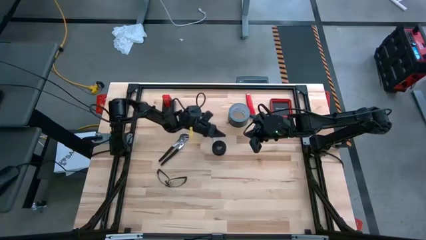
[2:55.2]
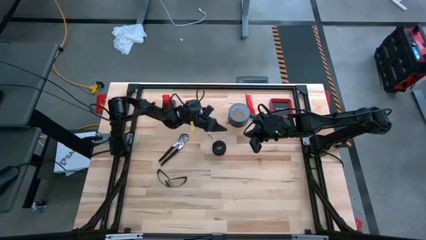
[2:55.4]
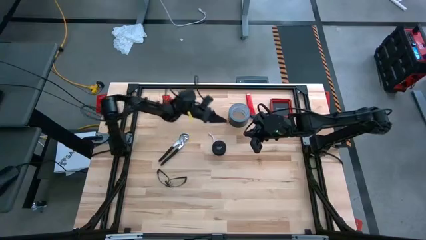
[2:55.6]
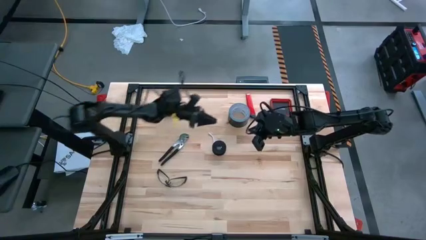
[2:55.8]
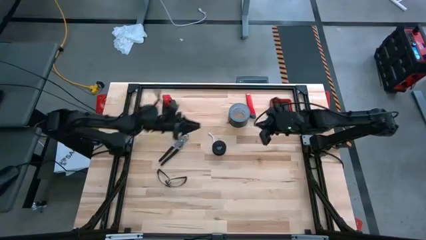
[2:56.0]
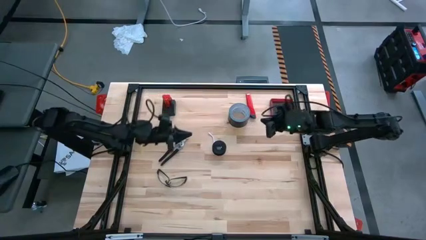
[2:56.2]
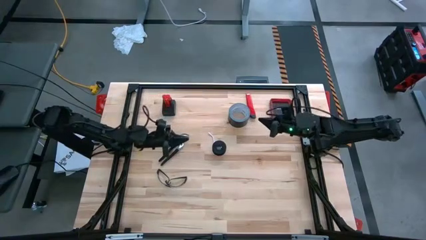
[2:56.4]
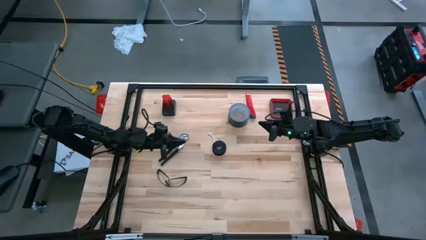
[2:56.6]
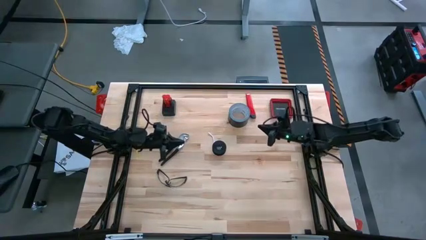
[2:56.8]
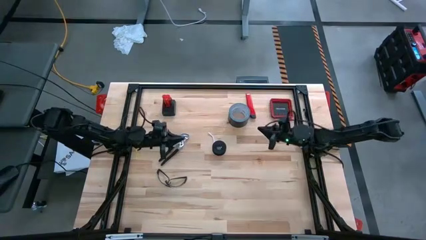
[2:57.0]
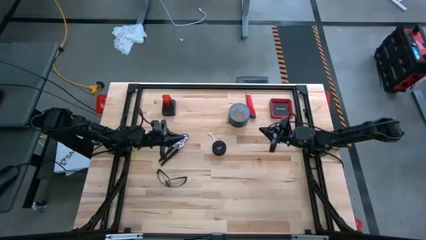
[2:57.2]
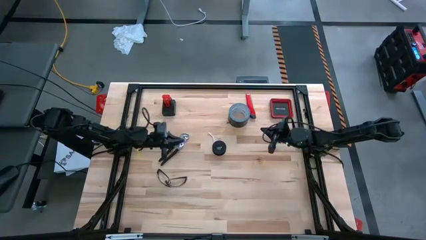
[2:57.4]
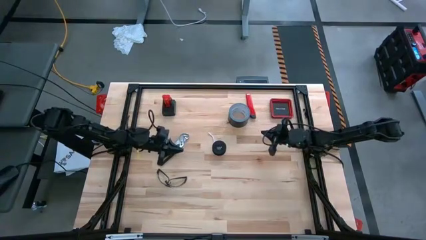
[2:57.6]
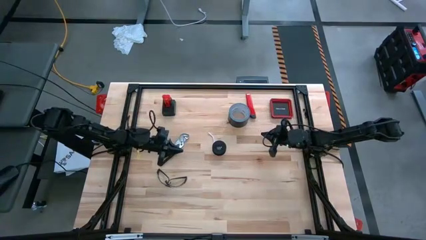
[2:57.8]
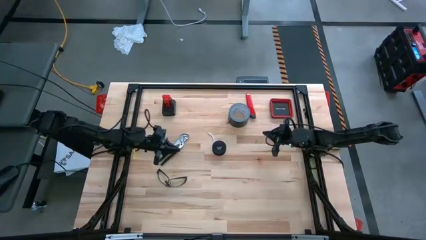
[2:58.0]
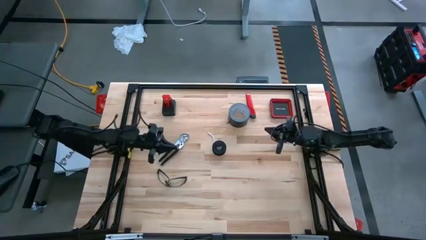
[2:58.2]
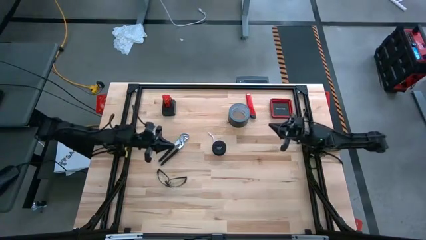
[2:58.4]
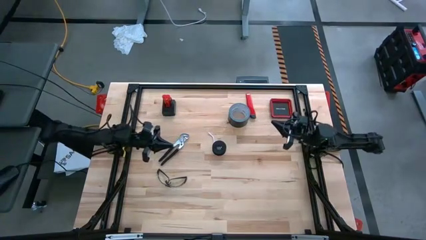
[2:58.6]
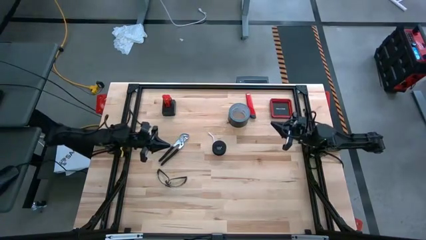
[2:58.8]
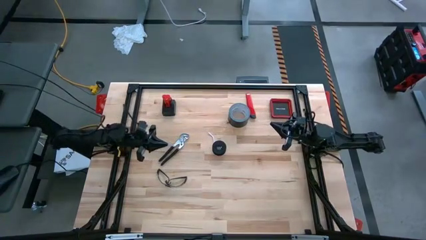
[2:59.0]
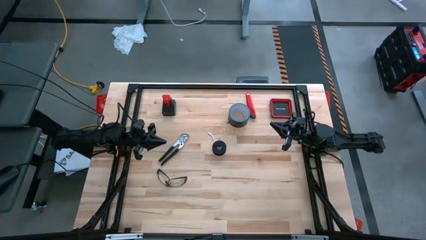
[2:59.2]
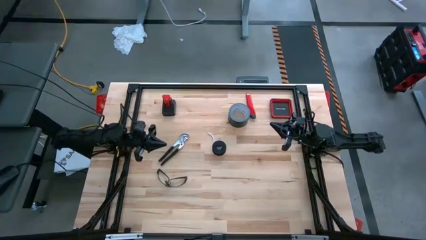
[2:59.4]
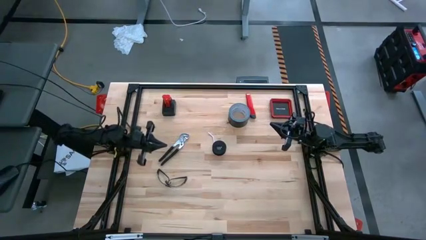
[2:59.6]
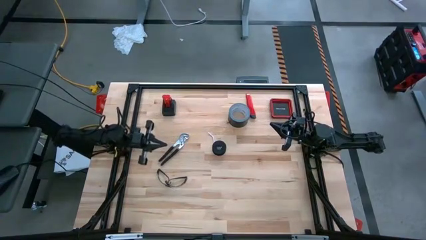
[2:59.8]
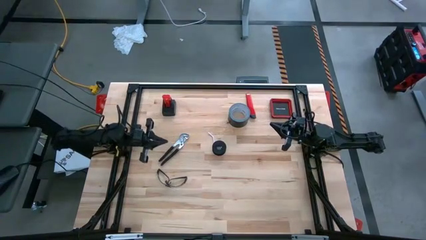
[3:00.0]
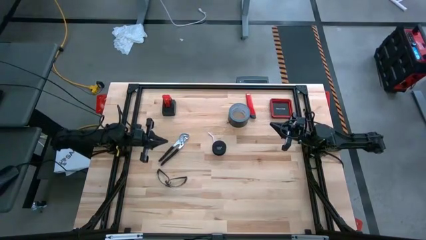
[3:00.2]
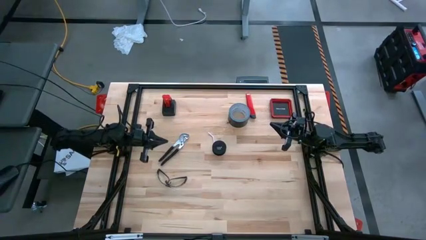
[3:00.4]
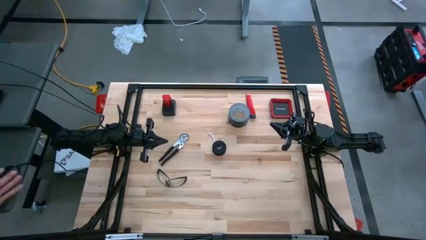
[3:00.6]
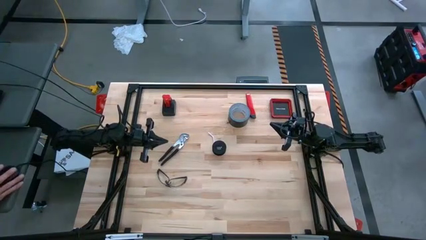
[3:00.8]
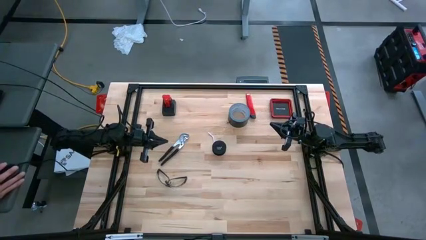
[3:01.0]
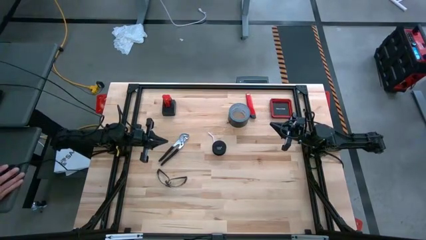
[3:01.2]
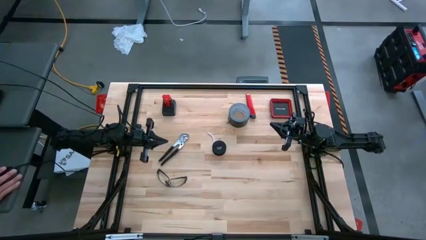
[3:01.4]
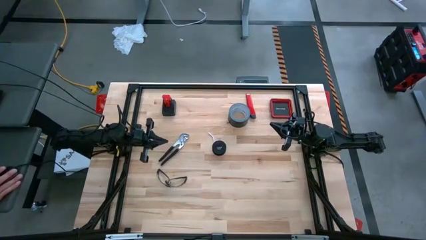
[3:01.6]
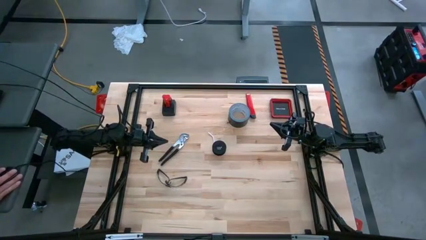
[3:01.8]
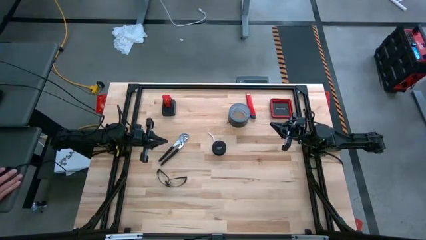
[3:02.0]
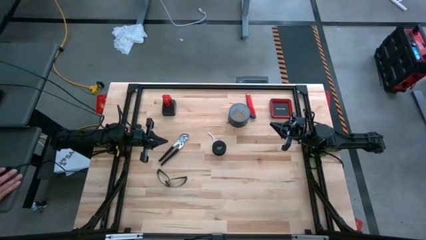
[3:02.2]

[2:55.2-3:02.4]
Task: Coil cords
Return to Home Position

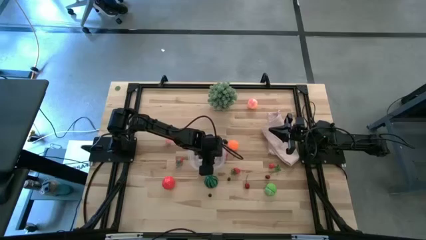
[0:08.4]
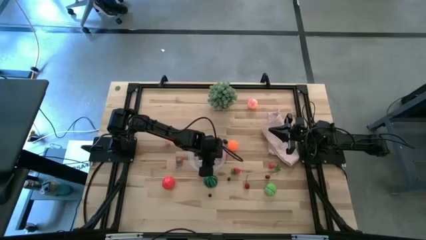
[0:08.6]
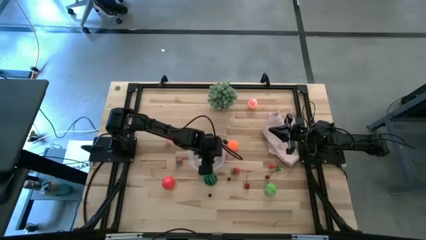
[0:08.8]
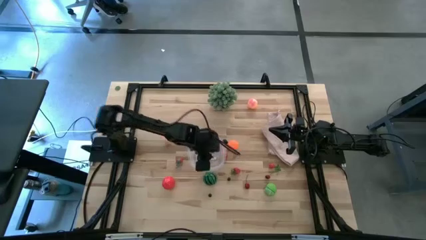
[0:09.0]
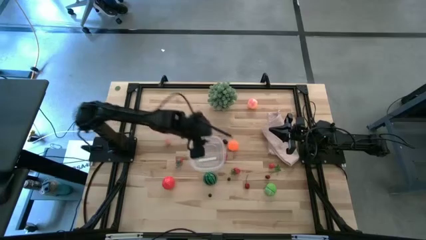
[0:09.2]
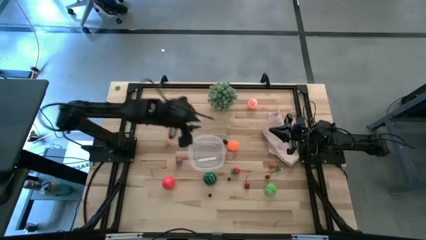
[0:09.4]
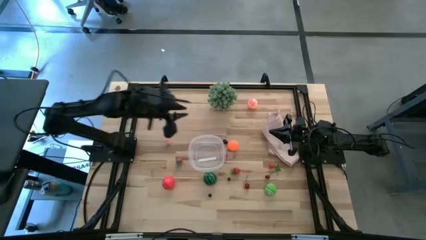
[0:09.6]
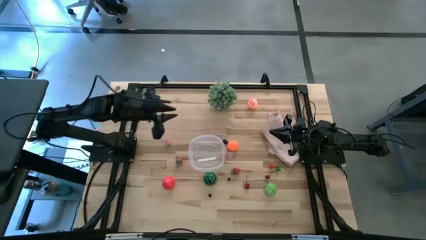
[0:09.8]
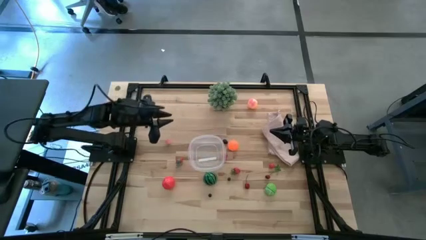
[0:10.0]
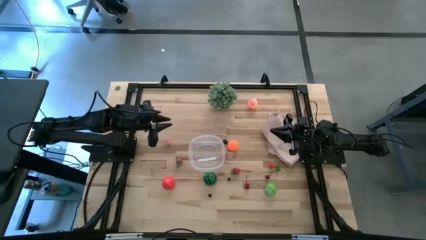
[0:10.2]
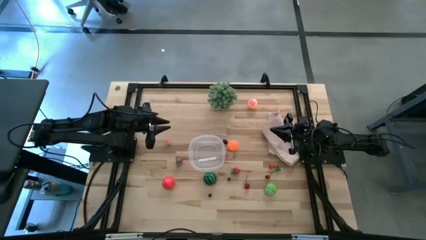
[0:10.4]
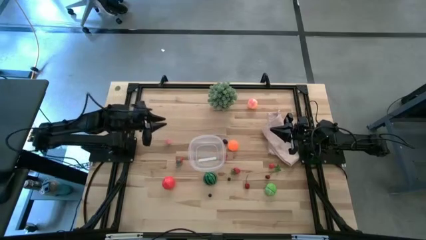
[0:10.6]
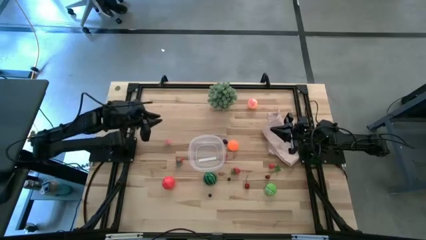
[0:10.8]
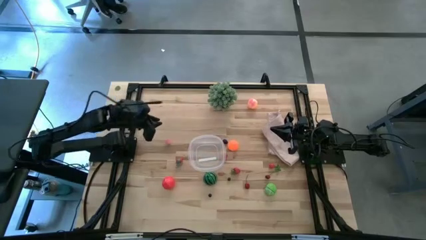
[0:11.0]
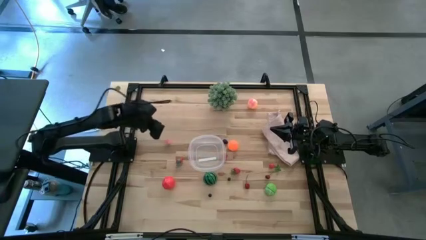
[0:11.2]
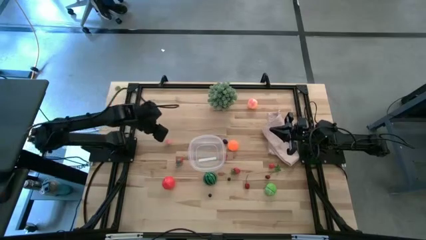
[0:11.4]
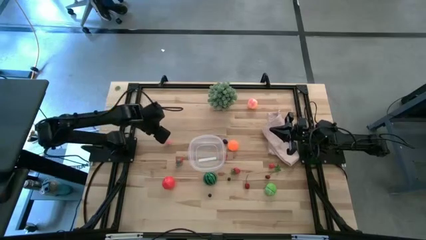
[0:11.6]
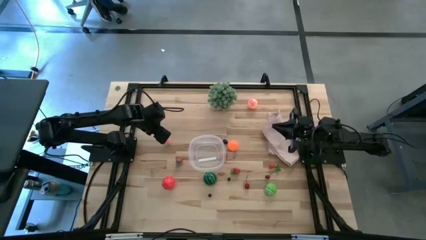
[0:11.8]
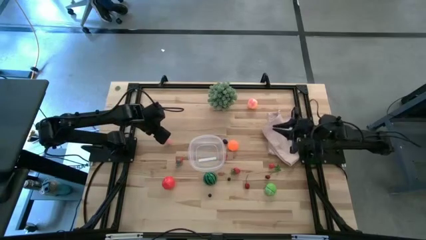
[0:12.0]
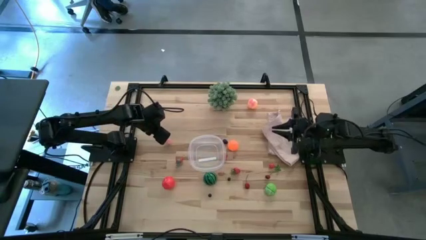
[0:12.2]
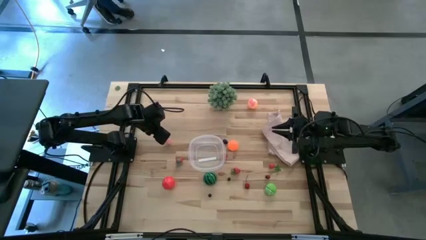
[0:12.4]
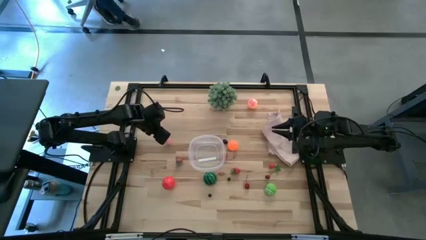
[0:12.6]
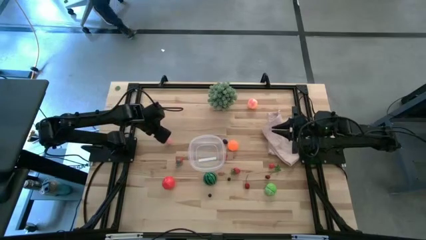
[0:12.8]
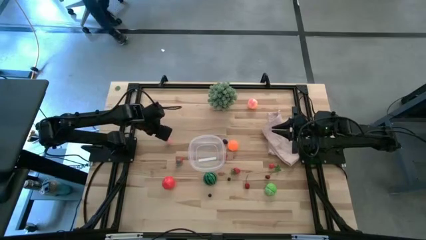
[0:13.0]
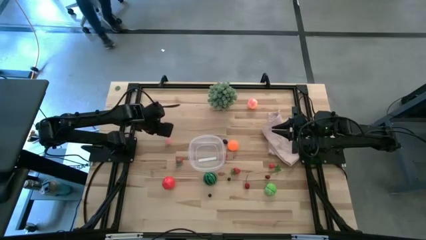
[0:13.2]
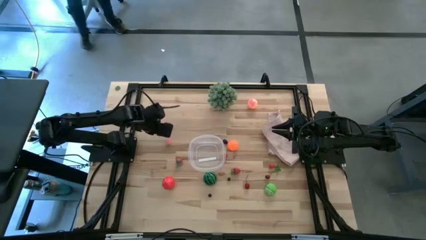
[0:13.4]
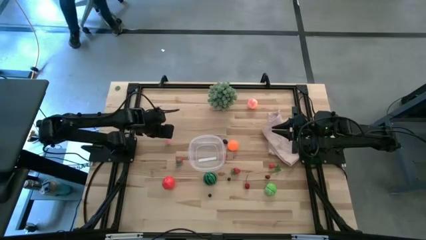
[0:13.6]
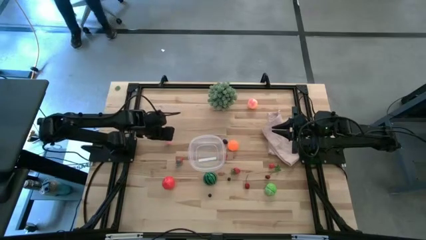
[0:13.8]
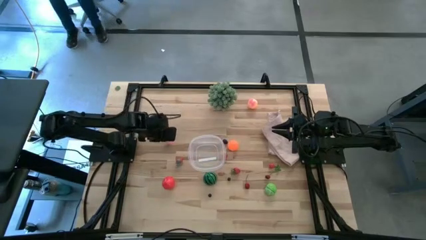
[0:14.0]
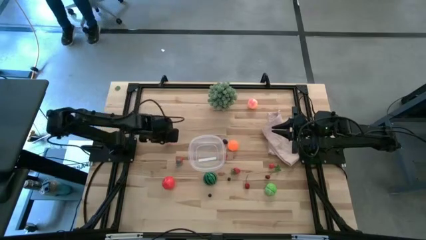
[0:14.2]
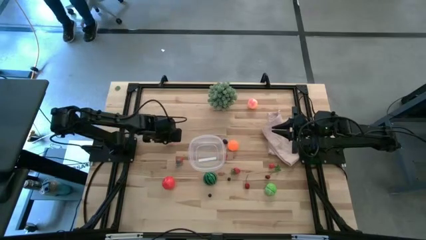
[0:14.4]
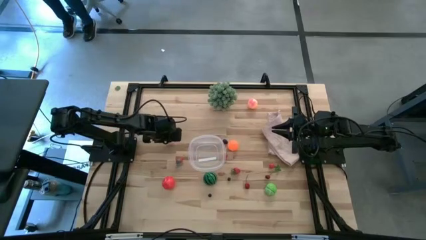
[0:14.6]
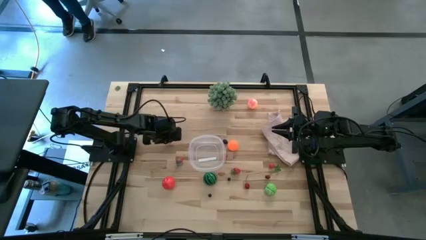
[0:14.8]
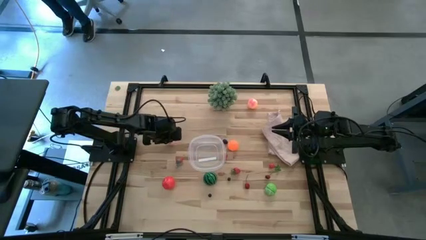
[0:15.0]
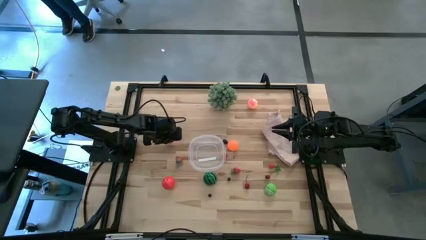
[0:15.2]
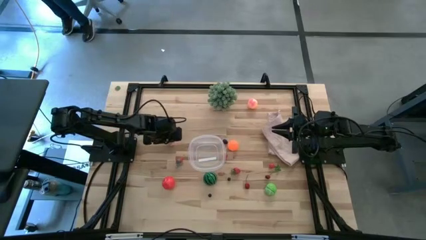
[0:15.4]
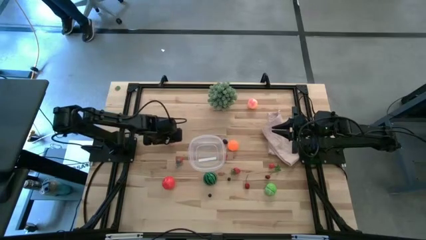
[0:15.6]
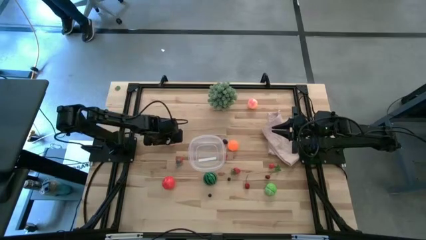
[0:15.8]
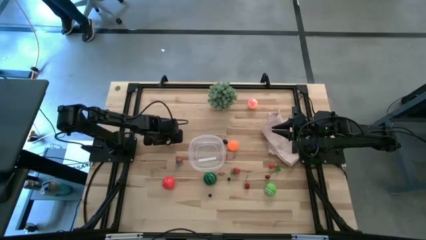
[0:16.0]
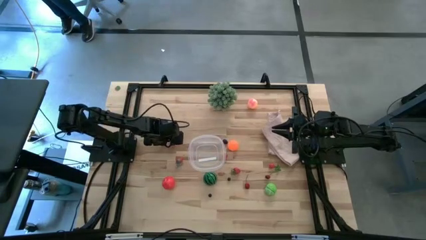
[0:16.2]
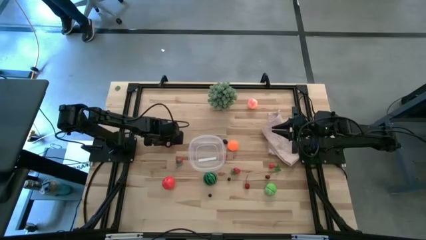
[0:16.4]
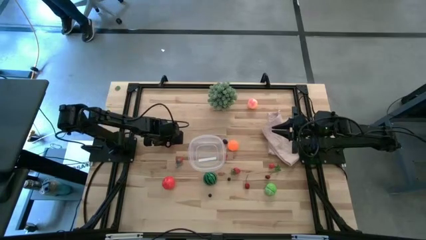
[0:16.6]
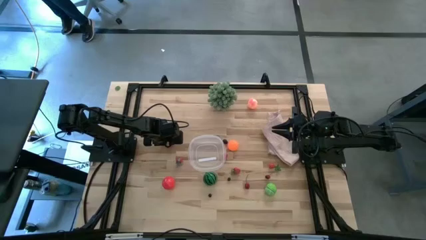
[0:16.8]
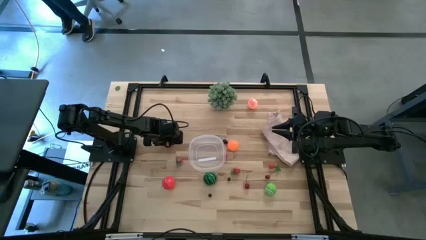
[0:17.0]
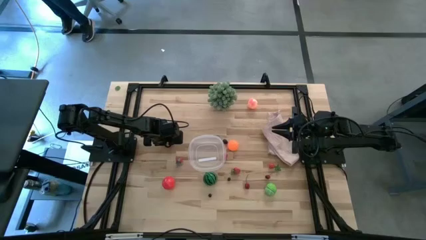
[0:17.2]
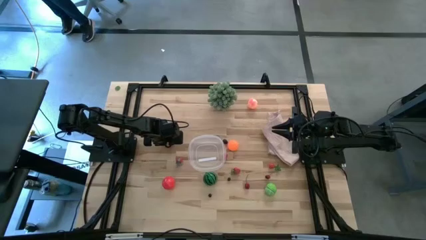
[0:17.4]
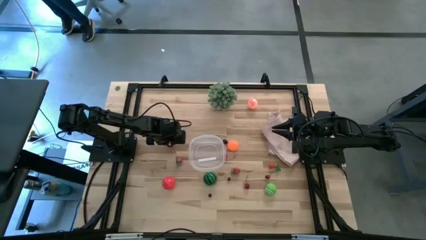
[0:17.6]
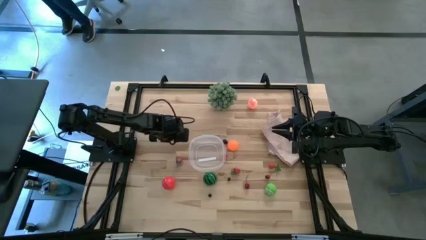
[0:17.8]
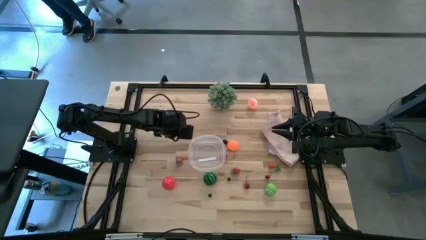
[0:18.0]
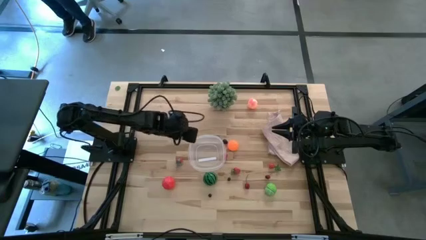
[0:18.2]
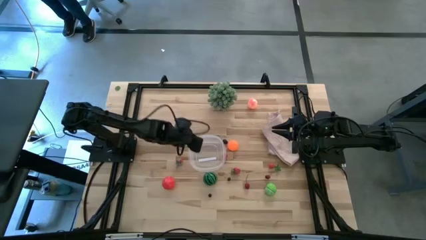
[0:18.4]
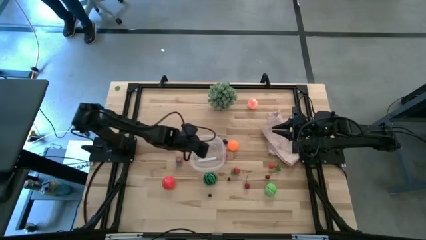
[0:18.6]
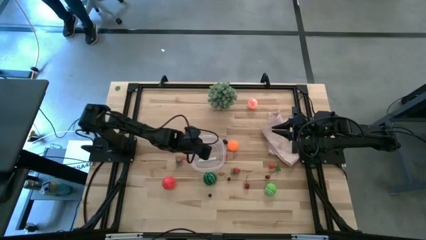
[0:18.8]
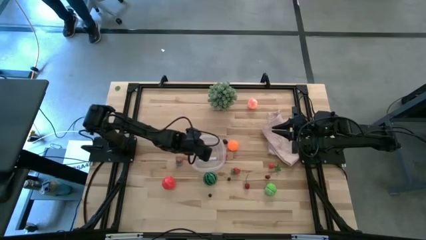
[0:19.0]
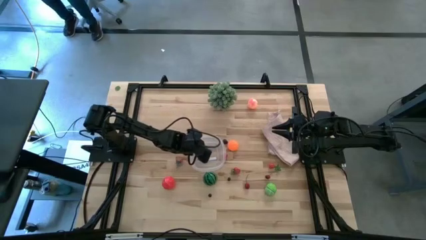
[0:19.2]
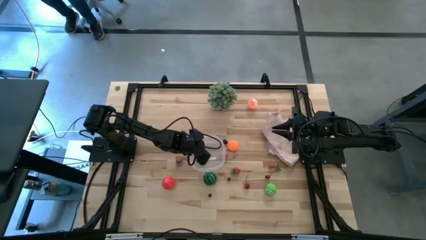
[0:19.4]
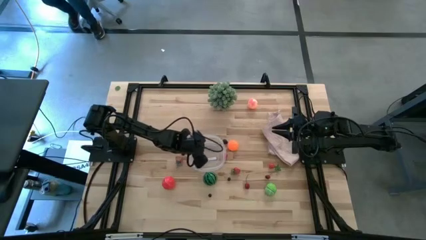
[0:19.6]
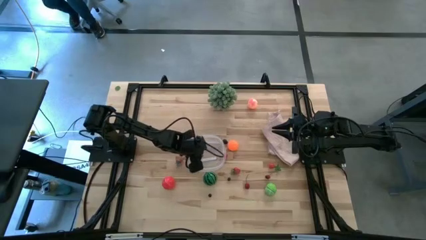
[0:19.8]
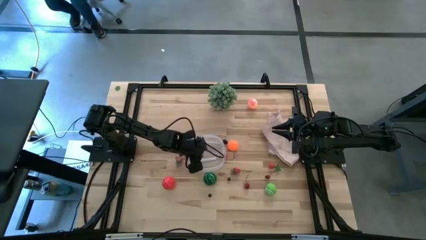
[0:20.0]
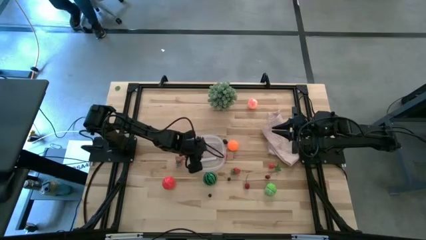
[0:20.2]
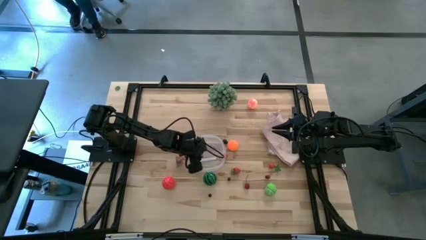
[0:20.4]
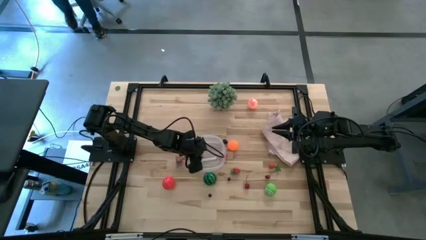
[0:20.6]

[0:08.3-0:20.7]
Task: Pick and placing Produce into tupperware
Put the bottom pink peach into the transparent bin
